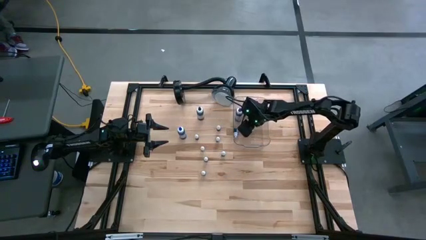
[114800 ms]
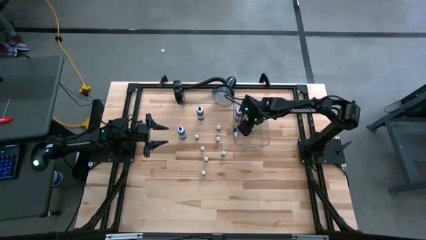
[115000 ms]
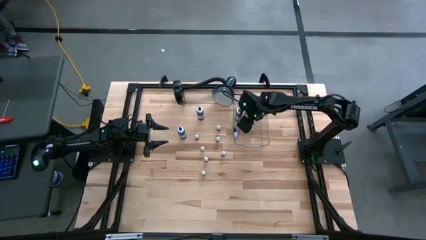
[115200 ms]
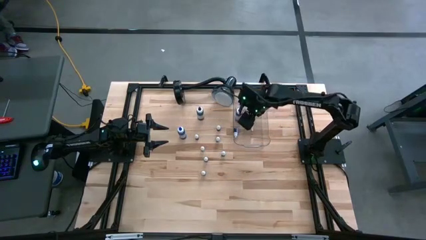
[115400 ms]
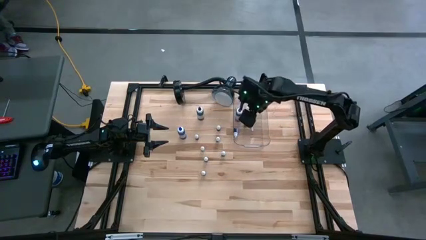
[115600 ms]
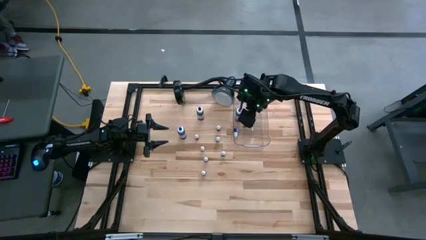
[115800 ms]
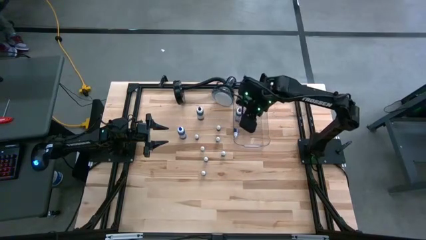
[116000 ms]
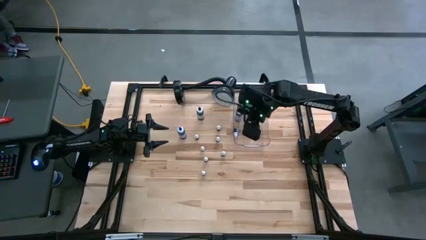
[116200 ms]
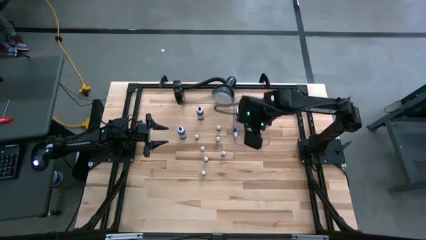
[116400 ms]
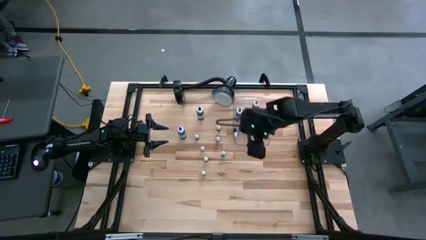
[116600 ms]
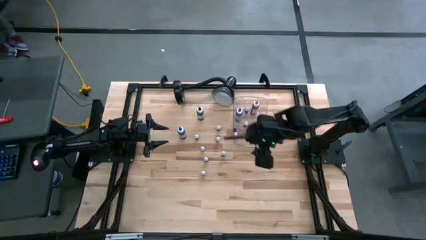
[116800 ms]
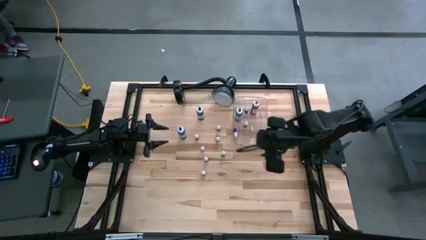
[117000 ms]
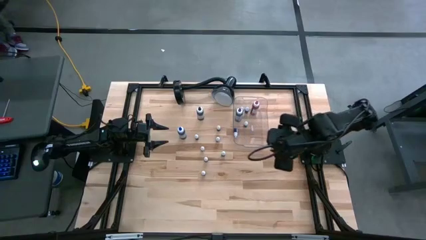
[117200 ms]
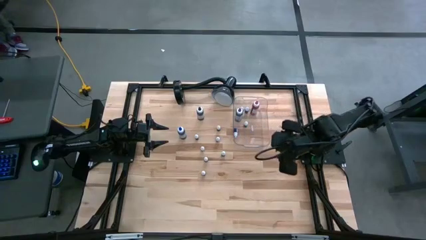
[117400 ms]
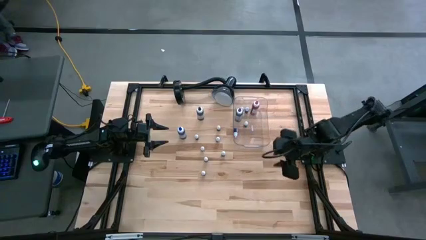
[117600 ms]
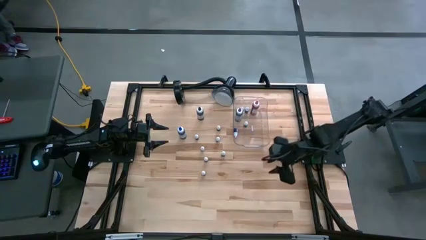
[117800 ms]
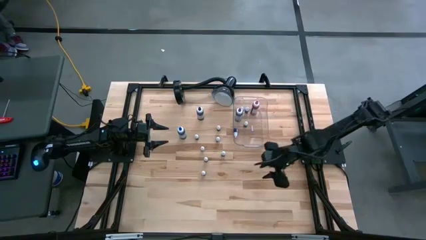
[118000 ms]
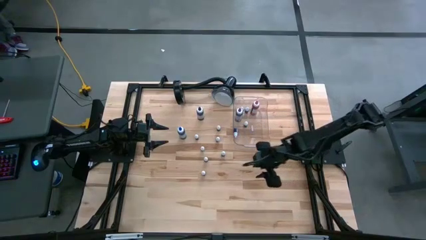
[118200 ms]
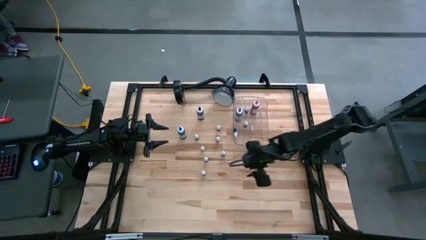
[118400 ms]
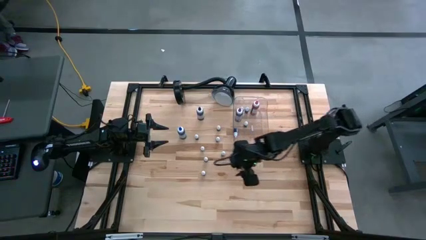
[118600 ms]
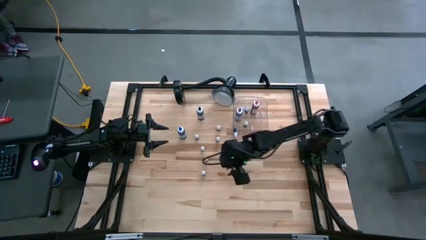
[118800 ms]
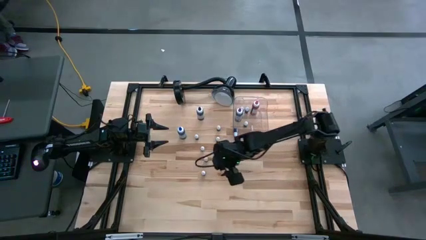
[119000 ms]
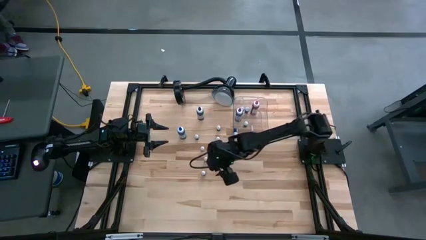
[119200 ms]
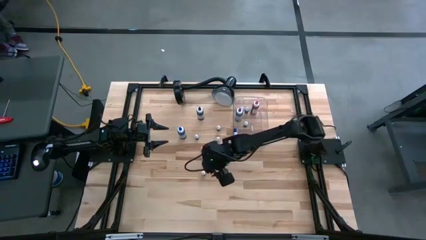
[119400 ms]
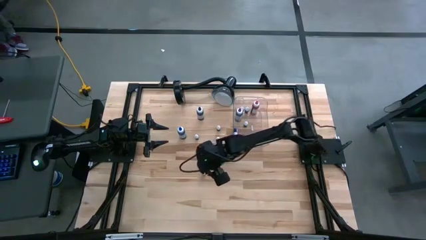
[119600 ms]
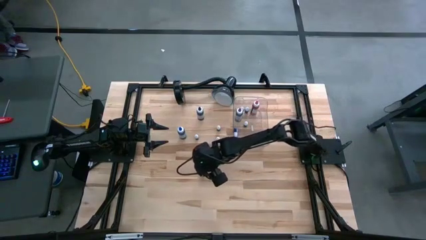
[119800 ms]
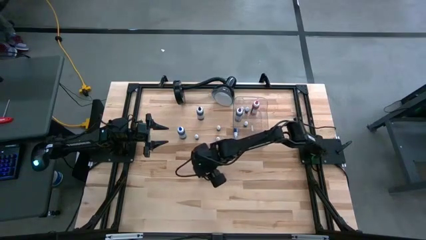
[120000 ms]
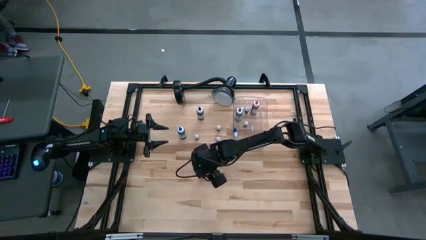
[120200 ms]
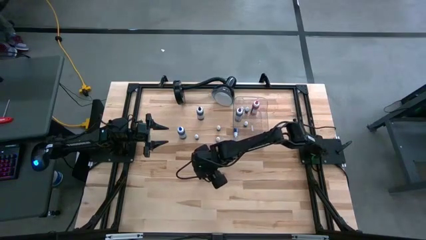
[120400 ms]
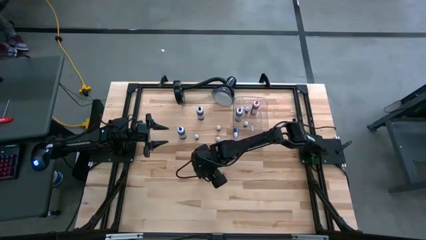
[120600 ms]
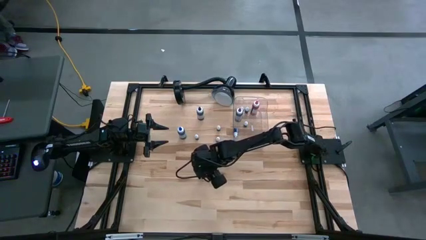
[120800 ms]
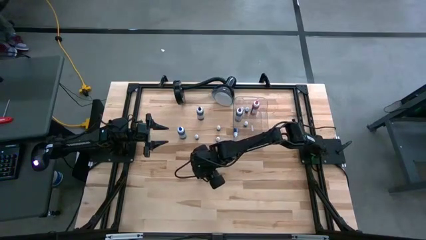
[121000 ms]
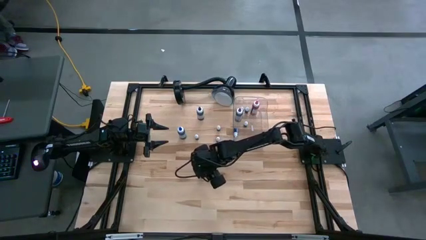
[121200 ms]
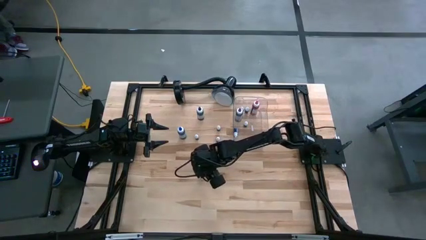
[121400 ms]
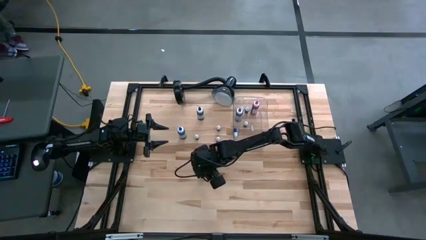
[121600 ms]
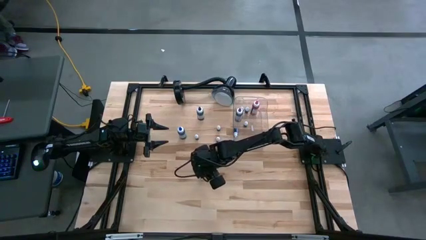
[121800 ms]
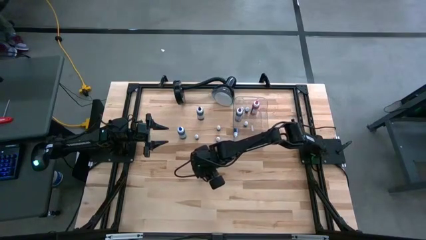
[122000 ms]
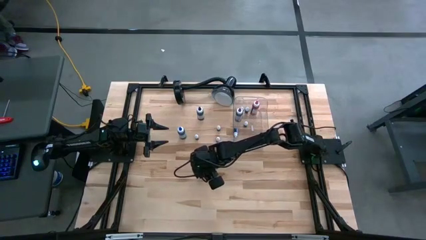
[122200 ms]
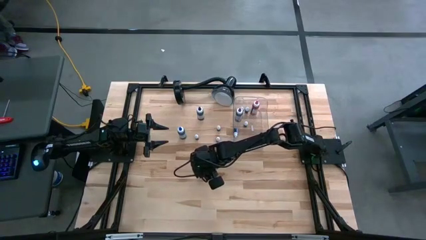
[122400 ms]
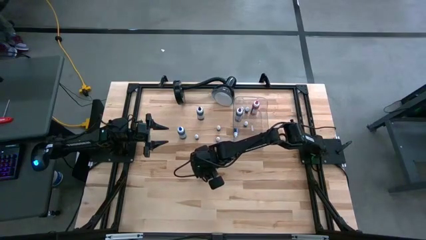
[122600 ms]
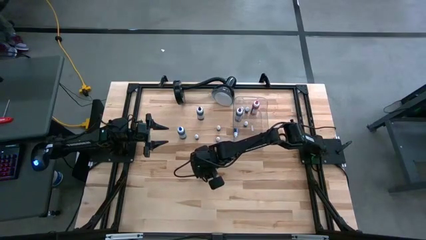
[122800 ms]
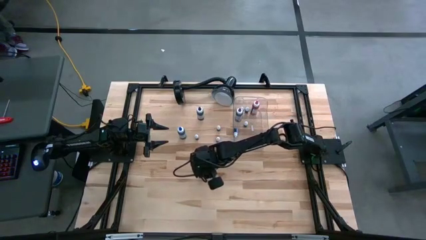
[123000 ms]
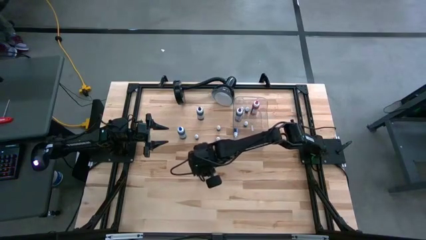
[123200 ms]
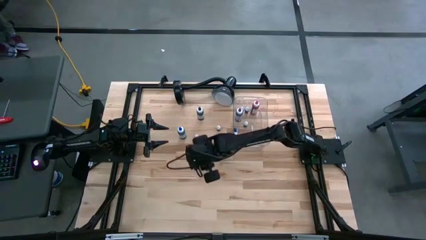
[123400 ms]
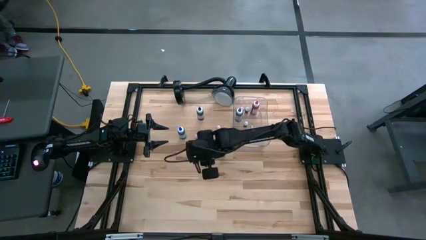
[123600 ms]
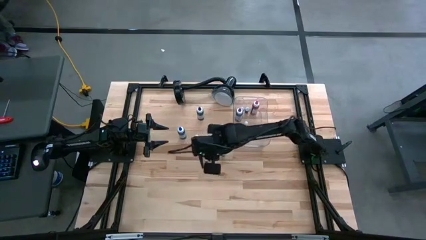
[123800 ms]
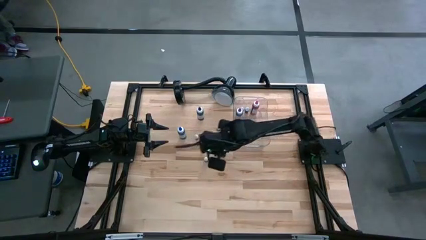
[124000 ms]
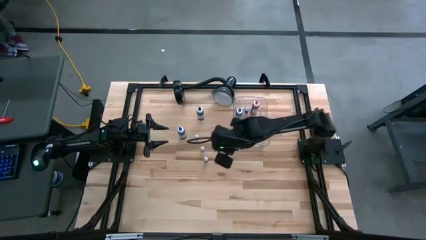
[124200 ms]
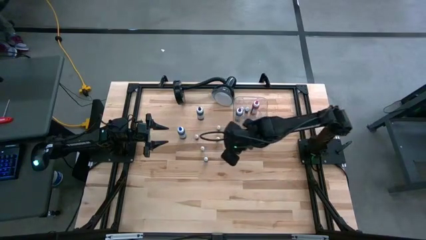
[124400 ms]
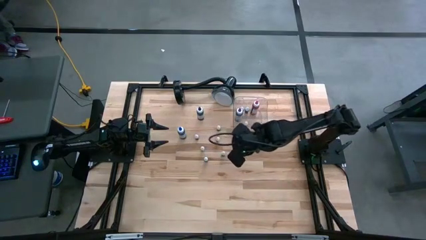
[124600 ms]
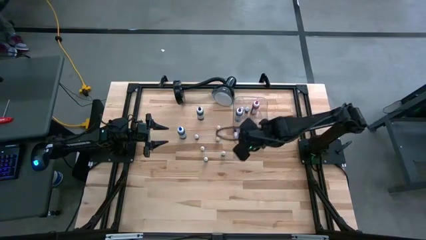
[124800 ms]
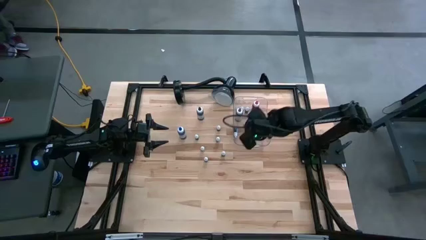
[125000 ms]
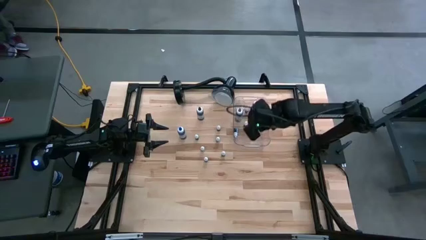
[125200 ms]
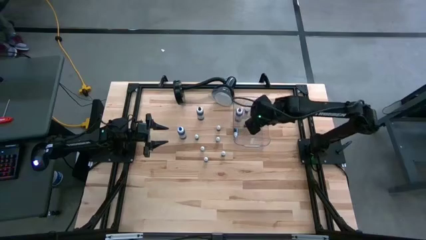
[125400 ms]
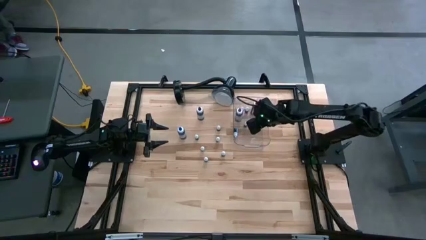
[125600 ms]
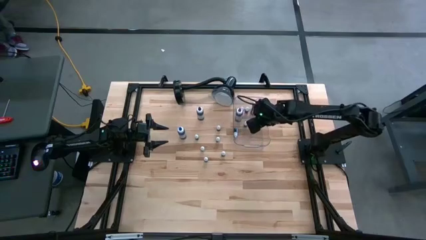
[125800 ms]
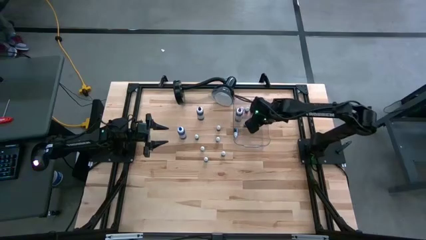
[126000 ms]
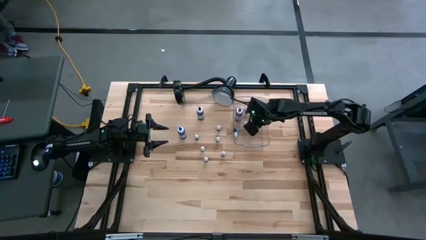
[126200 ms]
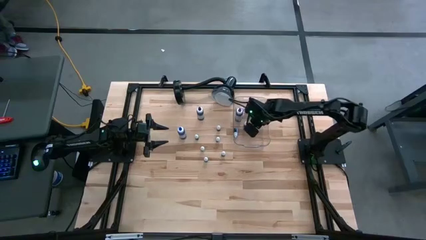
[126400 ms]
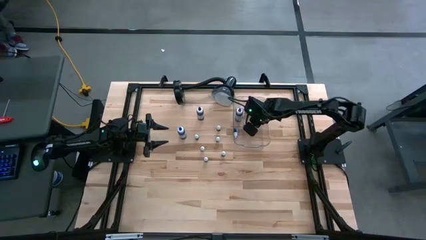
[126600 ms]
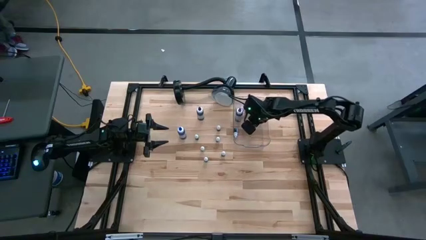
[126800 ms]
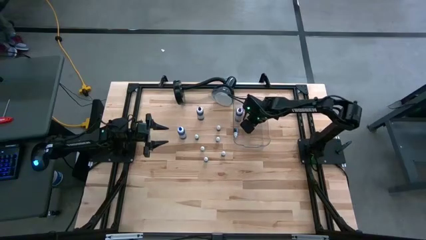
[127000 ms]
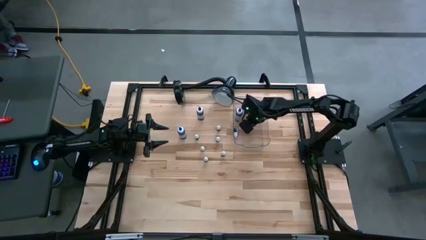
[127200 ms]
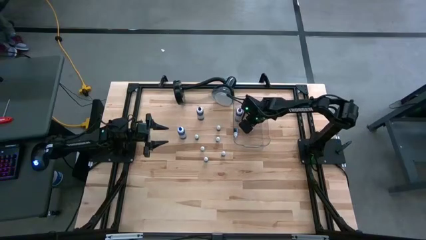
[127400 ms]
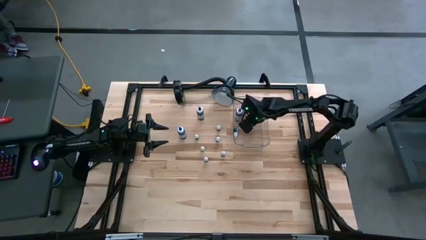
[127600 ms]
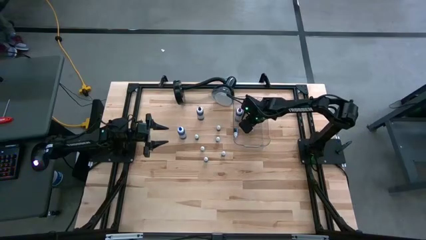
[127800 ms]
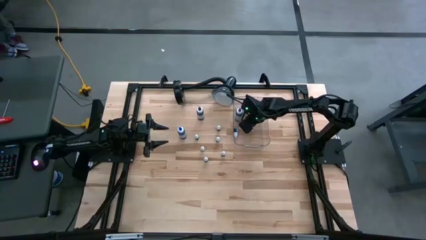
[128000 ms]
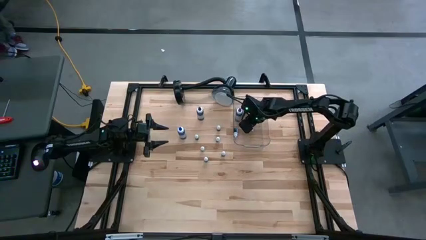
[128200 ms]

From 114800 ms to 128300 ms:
Task: Pick & Place food coloring
Put the small orange food coloring bottle into the transparent bin

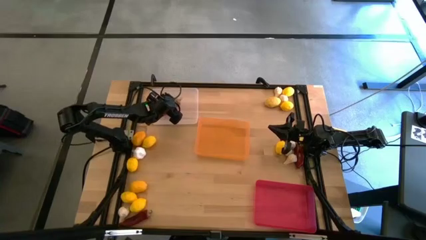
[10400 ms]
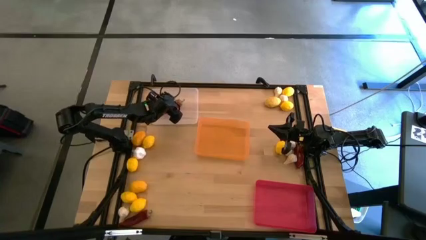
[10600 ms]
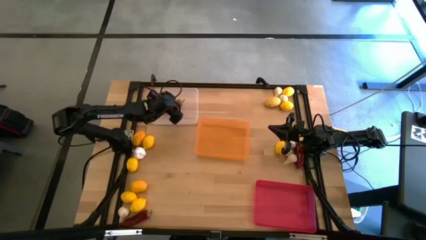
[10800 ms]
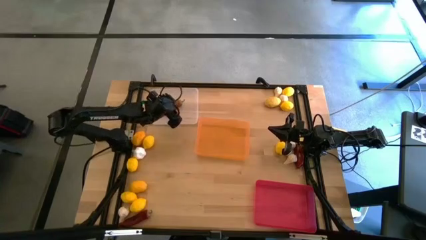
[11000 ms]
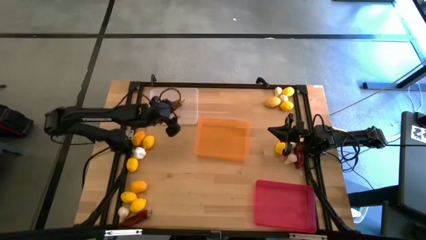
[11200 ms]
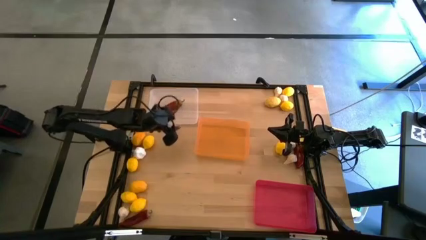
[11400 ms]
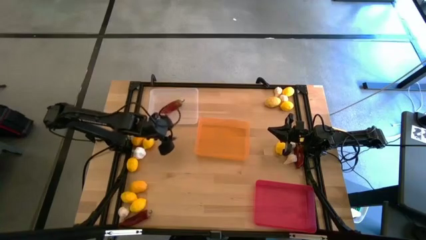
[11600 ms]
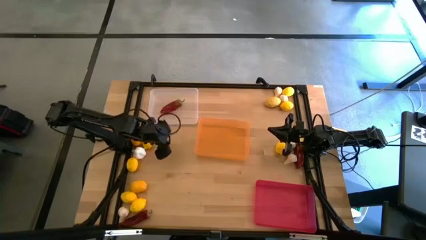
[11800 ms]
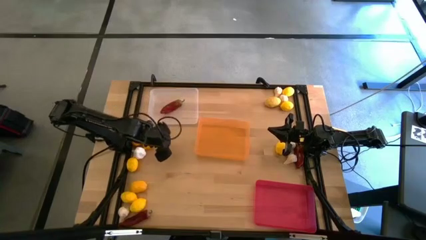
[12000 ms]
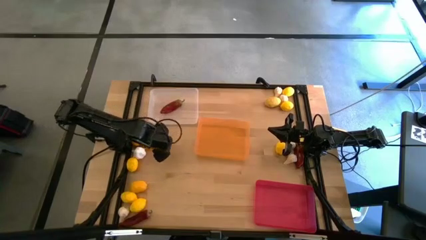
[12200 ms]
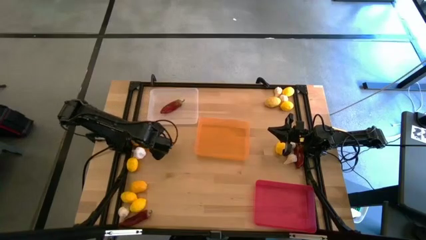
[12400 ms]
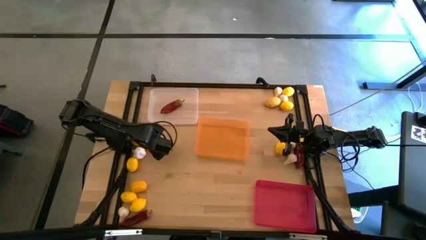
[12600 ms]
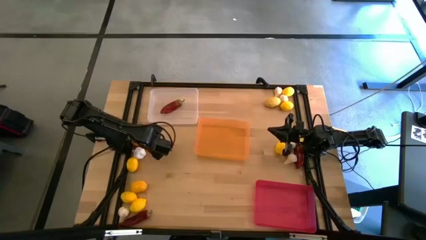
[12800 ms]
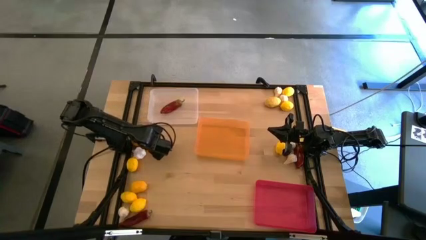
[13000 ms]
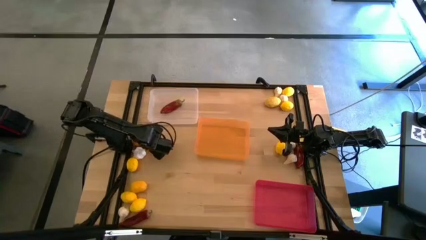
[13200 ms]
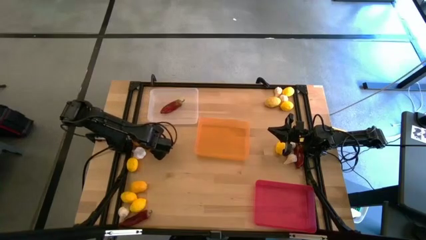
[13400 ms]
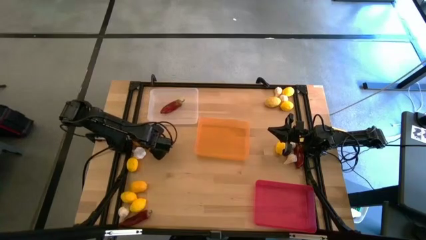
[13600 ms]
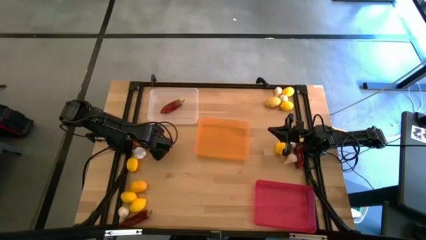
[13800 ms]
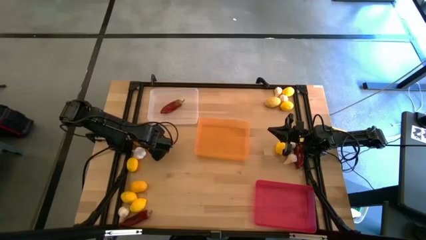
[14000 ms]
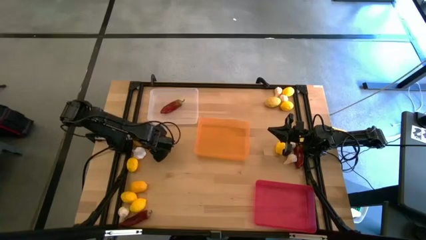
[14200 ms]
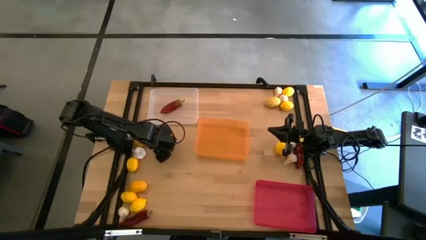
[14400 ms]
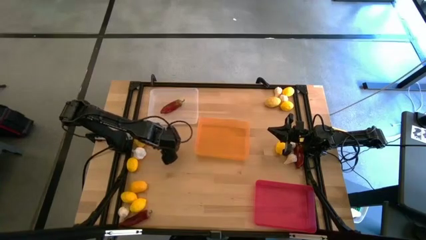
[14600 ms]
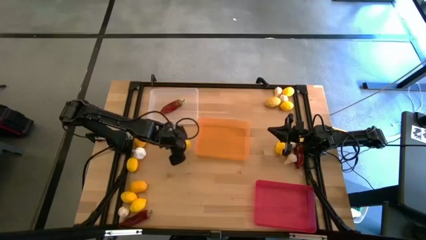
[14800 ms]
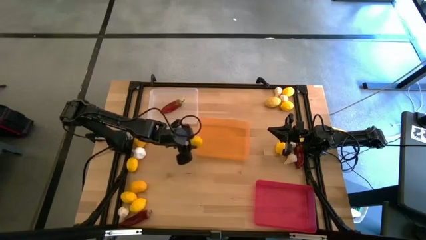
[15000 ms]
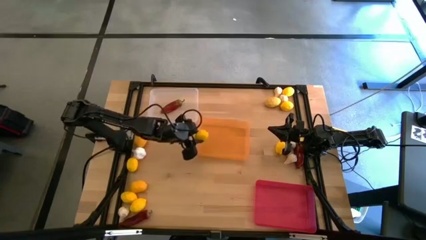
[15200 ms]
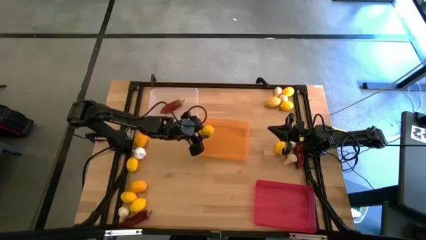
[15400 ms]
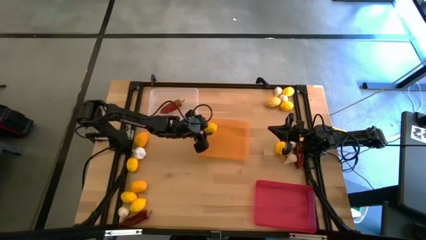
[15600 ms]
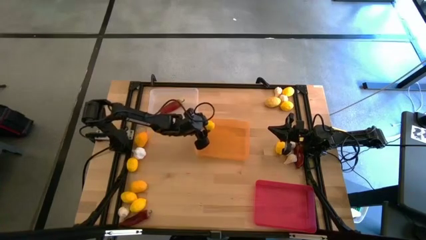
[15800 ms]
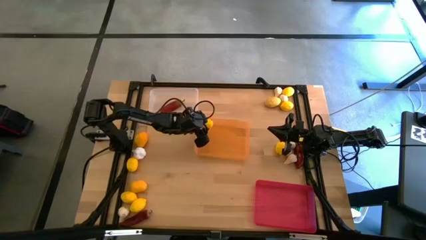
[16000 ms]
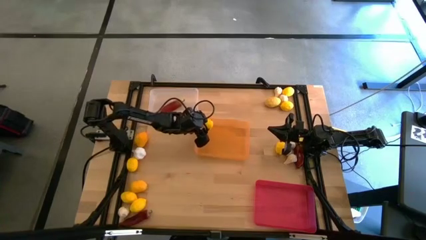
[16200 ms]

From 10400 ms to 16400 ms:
Task: Sort produce into baskets
Put the lemon into the orange bin
